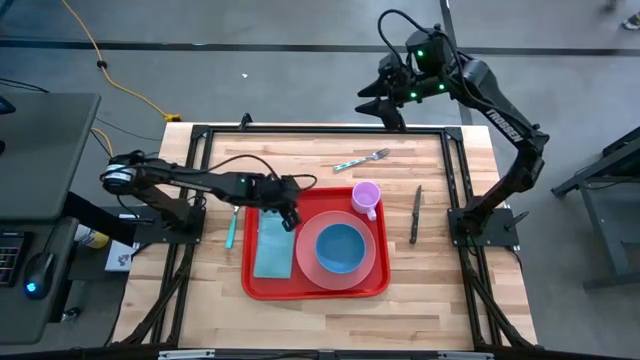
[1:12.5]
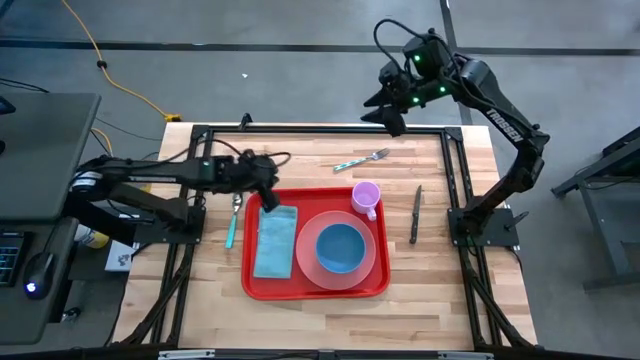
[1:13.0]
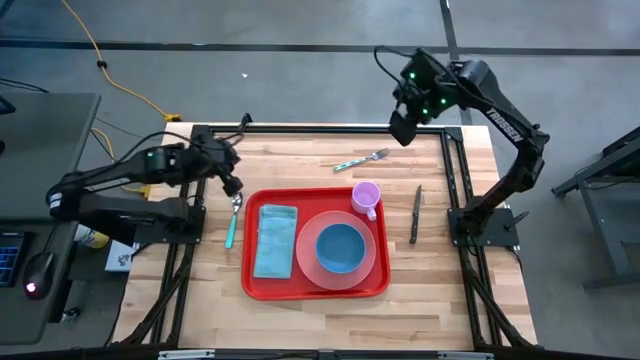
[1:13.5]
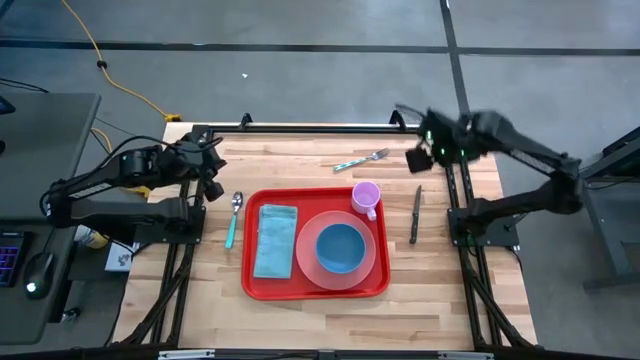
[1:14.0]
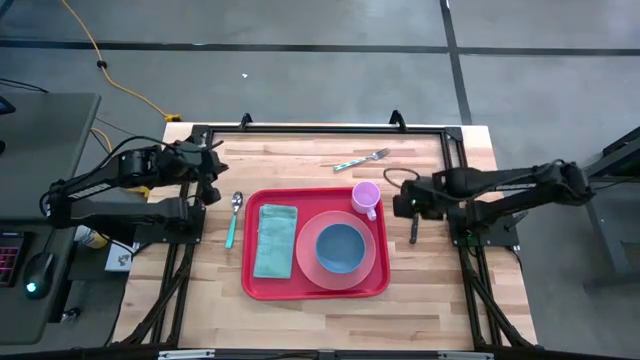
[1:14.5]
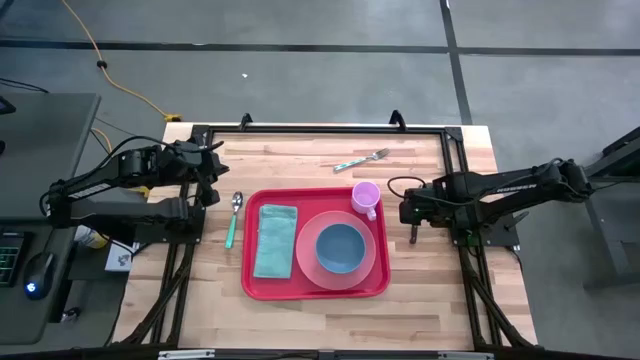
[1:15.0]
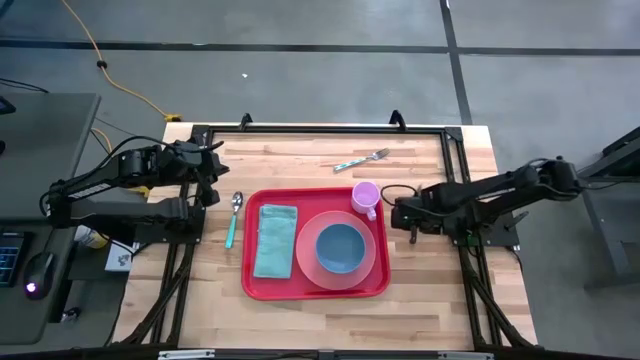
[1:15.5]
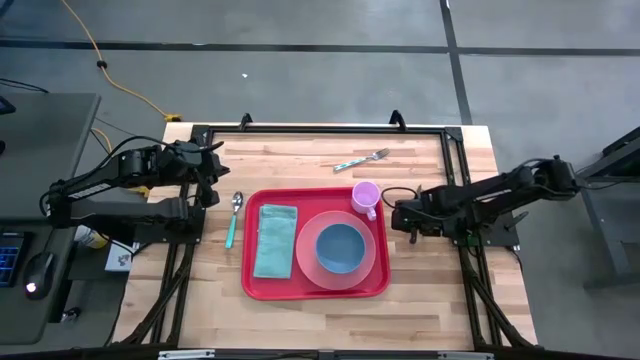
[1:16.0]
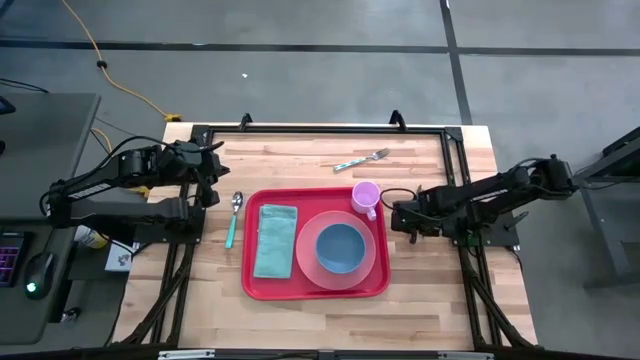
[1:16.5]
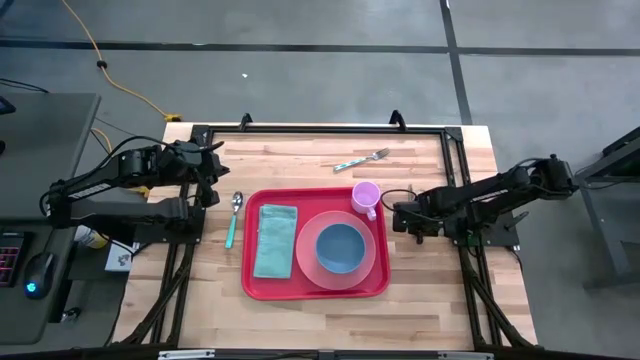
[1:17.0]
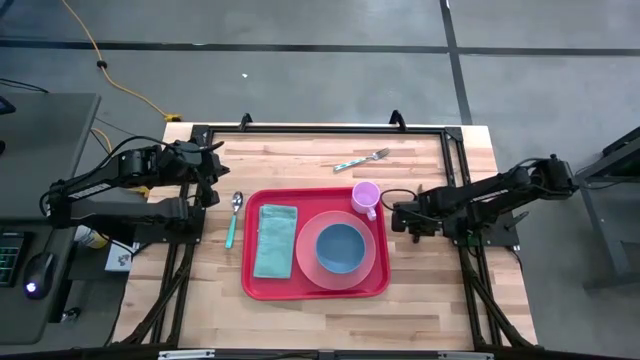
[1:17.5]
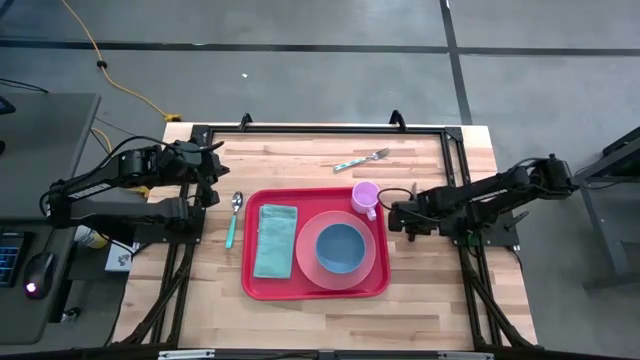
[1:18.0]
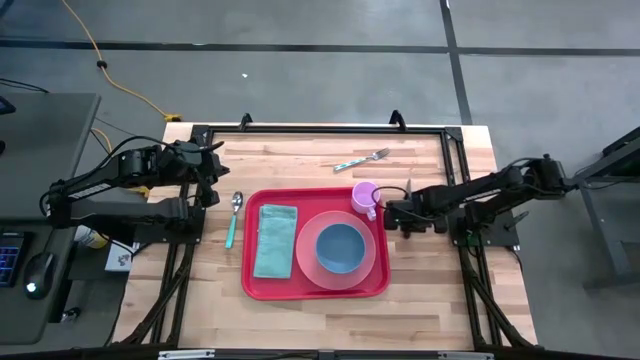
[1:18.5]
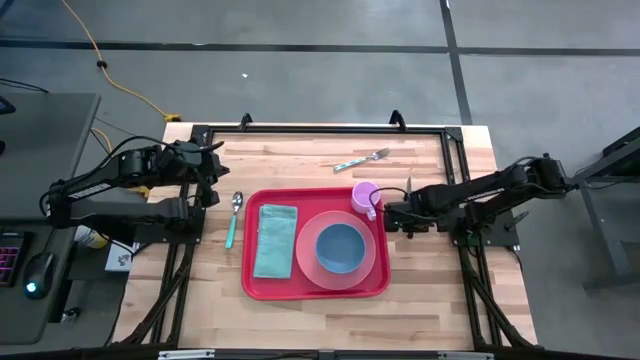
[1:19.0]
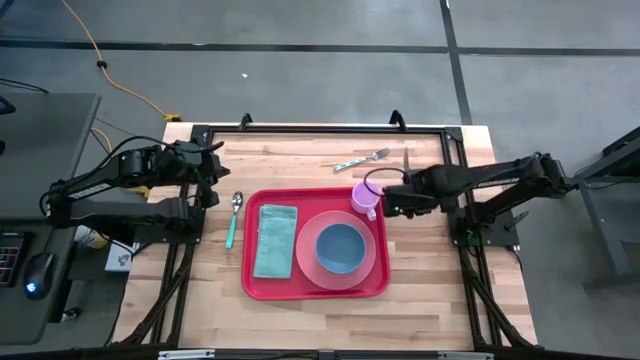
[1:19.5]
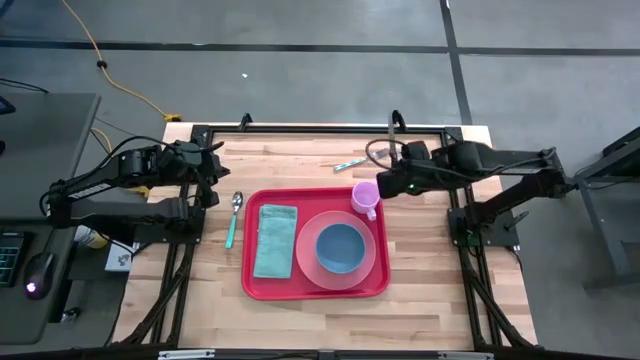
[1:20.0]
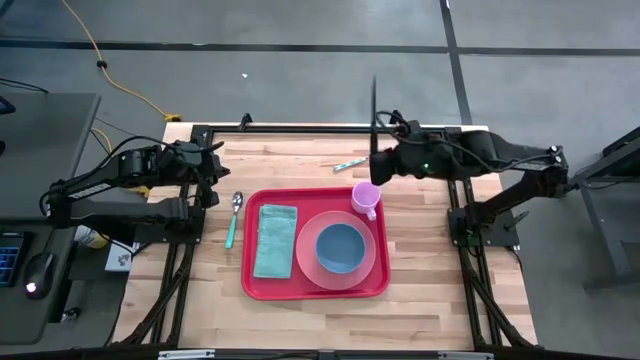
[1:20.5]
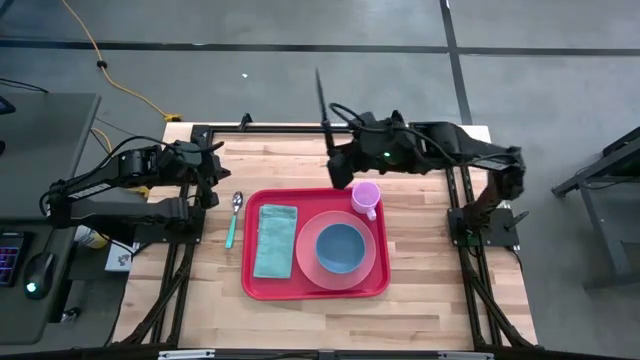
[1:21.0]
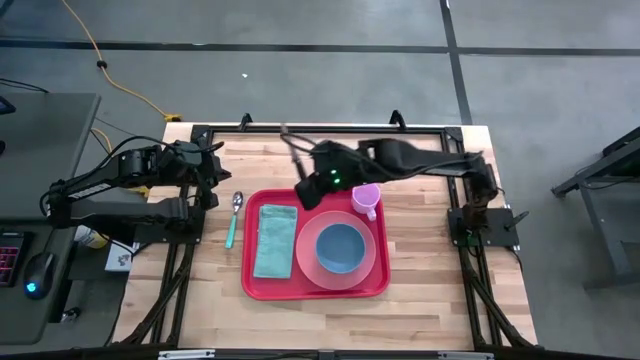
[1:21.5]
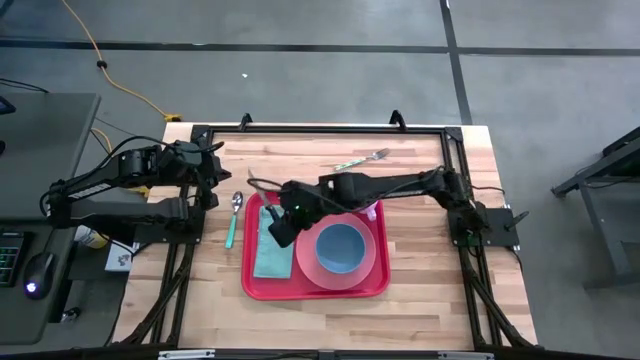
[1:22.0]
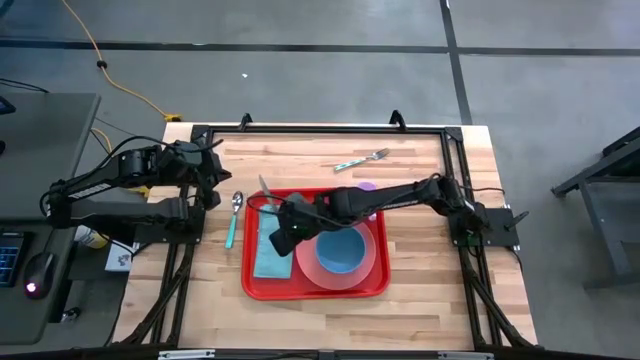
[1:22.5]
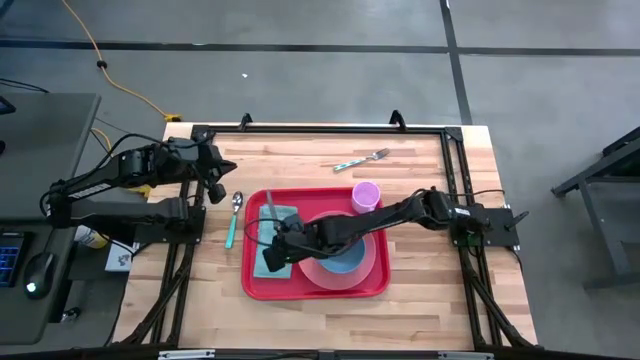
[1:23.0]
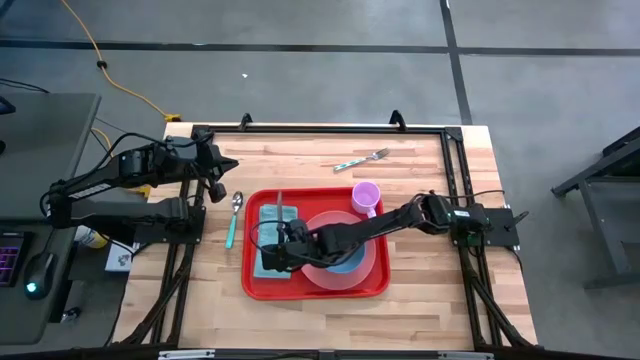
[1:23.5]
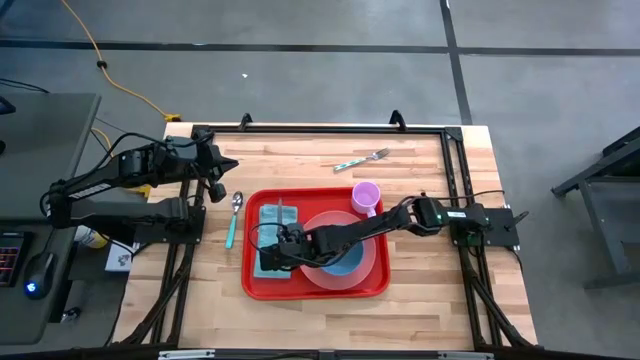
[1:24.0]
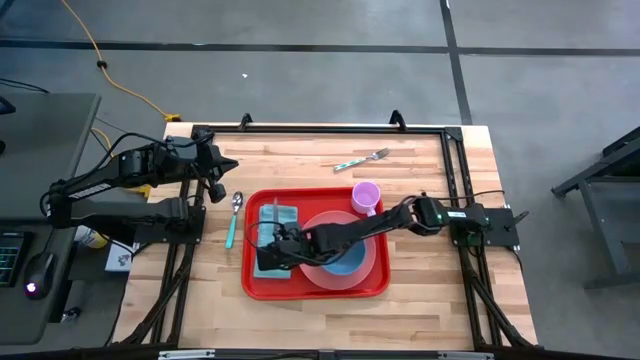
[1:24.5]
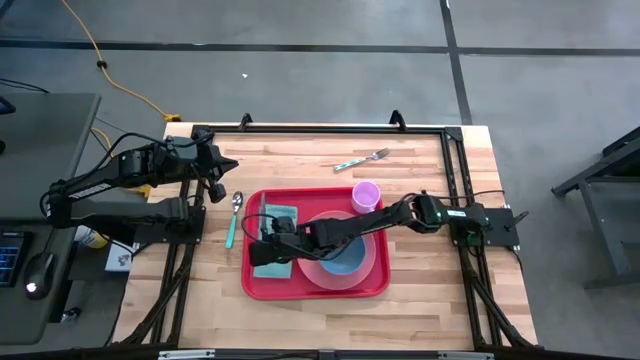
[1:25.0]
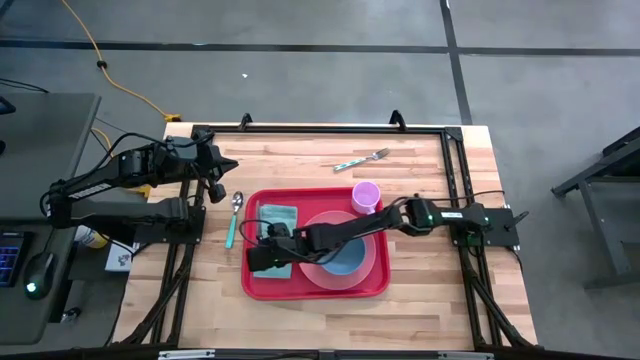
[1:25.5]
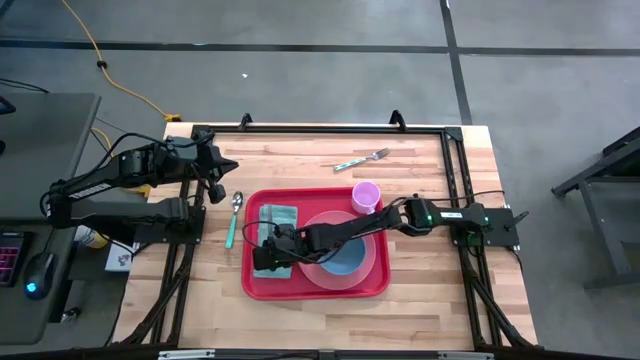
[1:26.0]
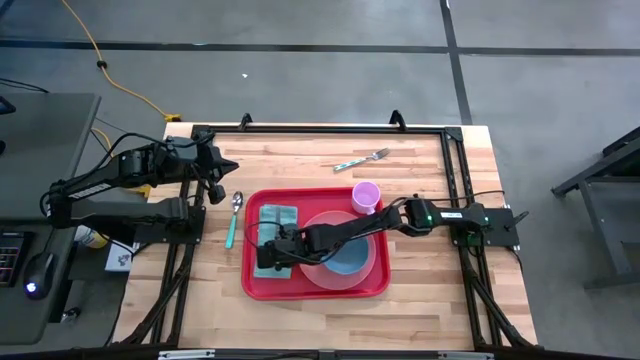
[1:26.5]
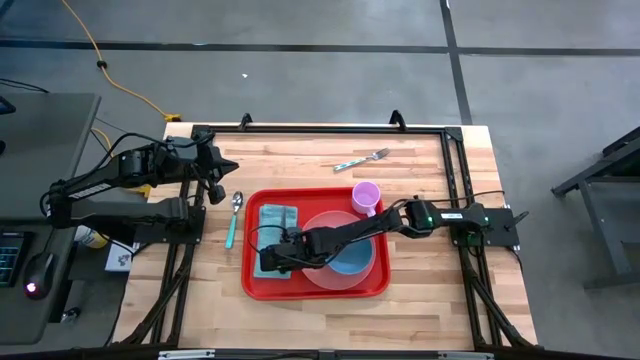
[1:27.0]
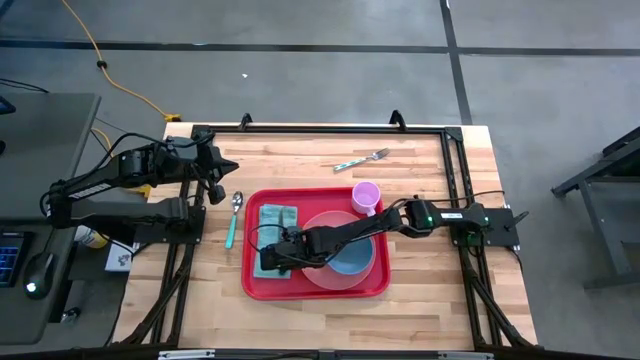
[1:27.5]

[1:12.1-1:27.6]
Task: Set up tray
Put the black knife on top of the blue napkin

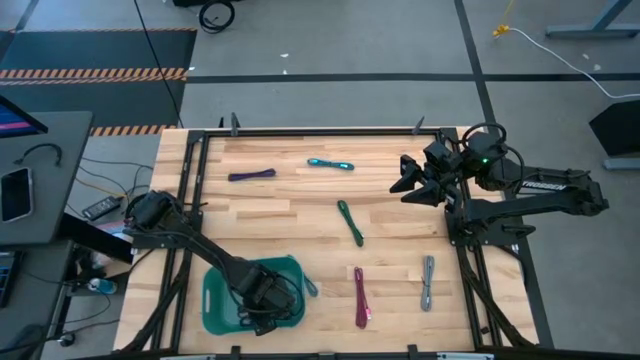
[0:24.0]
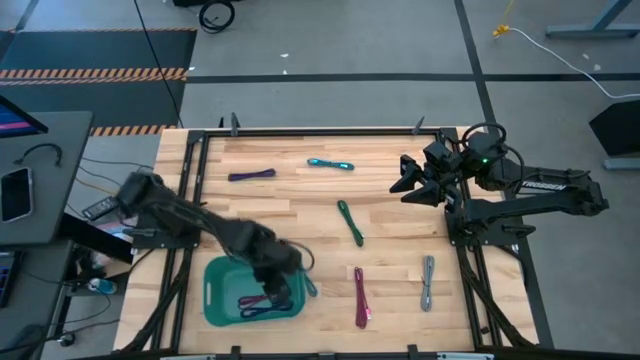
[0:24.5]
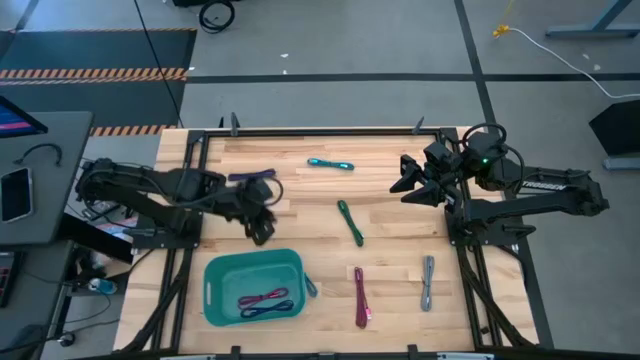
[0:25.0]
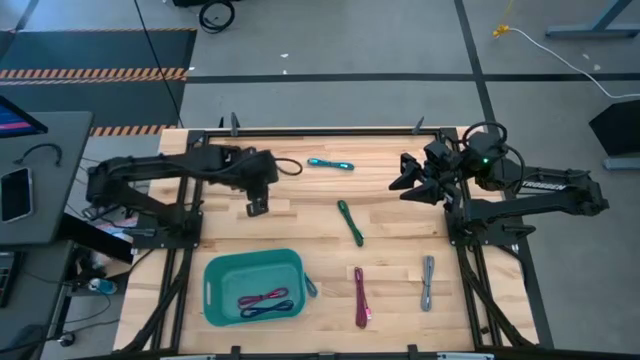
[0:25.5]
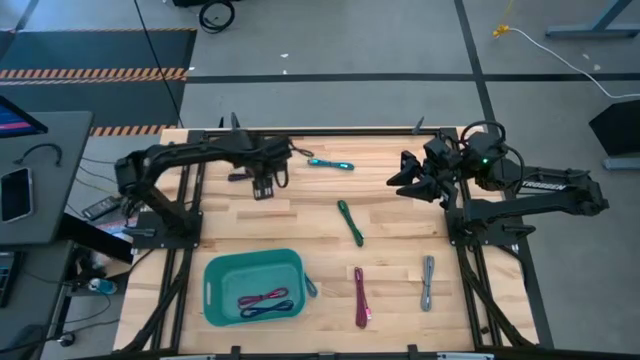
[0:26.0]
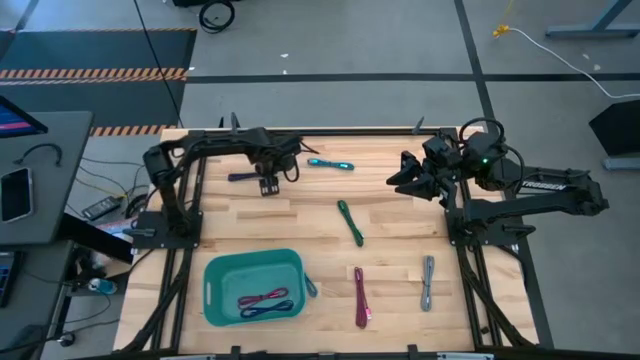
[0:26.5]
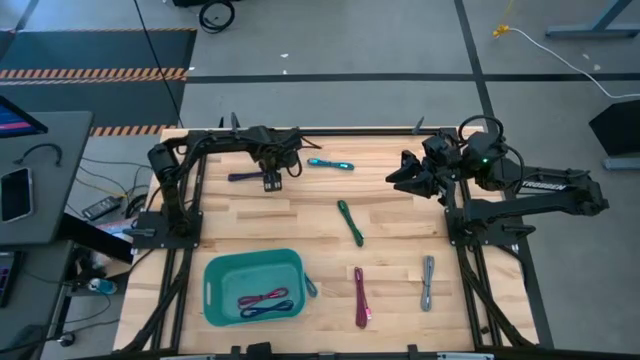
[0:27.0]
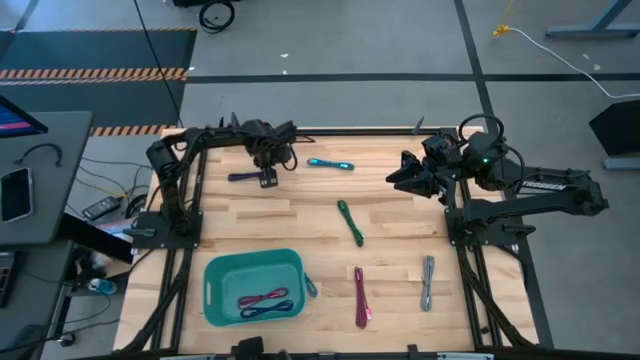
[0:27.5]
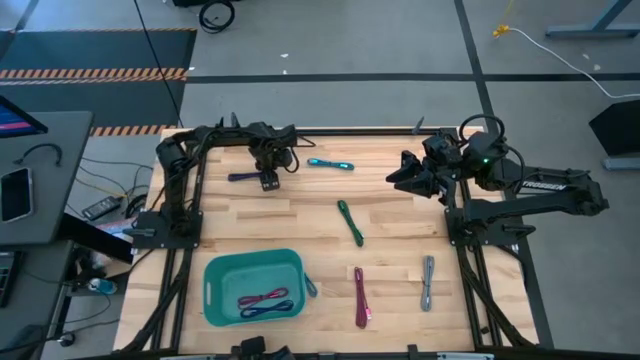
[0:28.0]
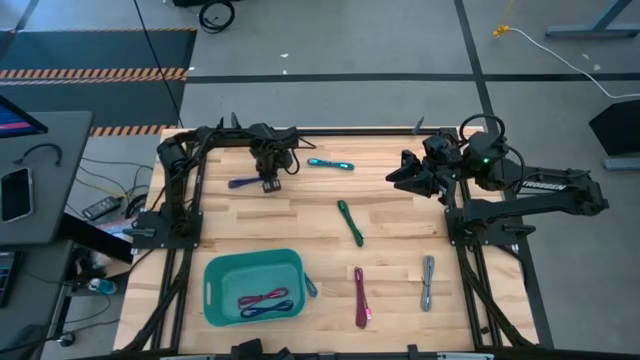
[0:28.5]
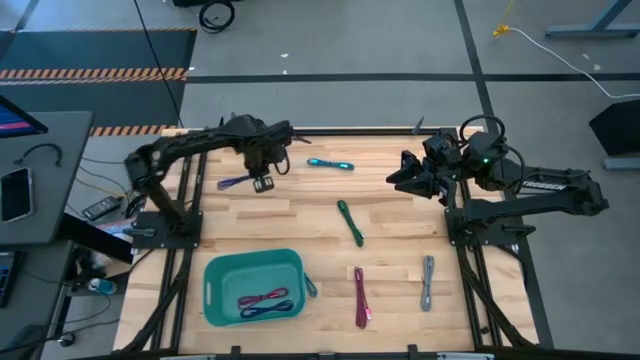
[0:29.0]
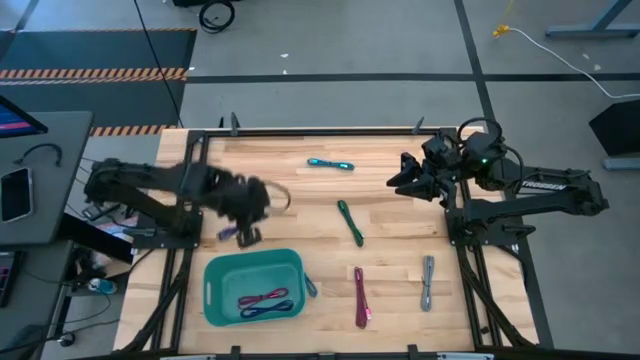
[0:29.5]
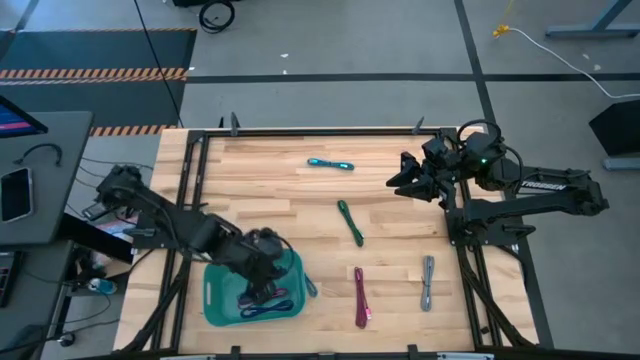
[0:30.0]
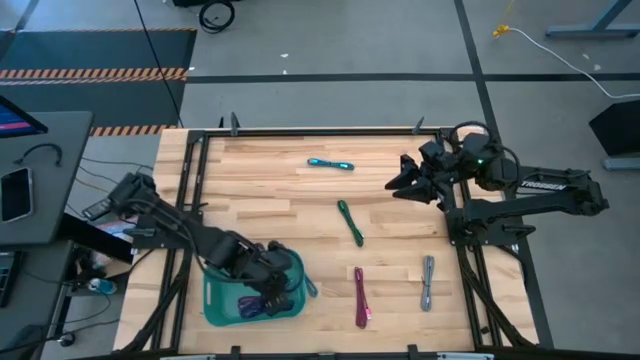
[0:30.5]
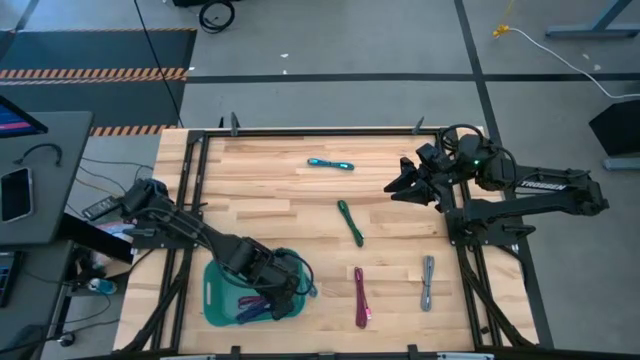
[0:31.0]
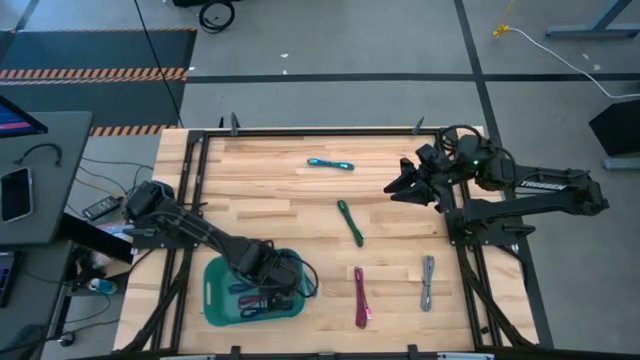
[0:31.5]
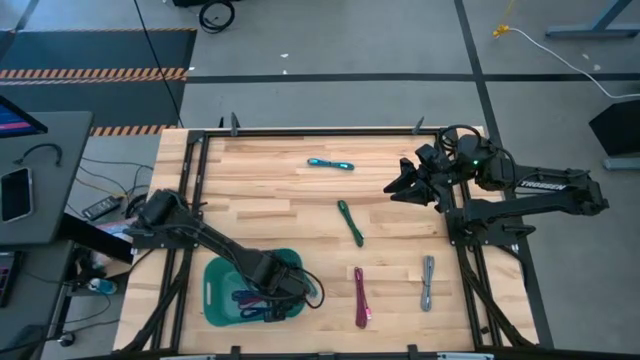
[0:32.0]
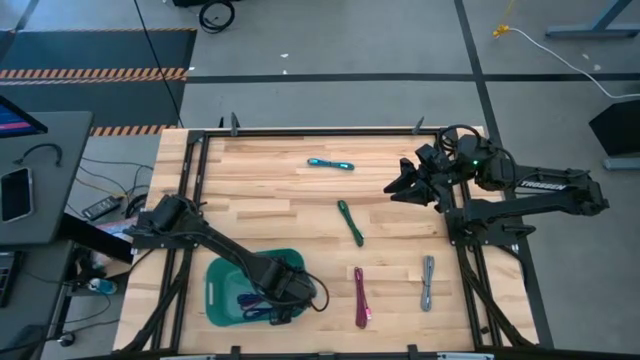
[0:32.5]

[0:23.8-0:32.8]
Task: Pick and place USB-C Cables
Put the blue charger cable into the green bin
